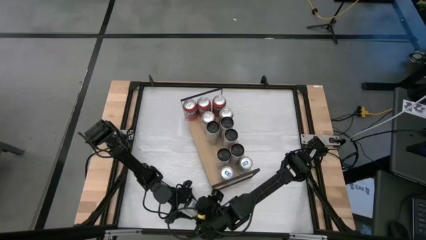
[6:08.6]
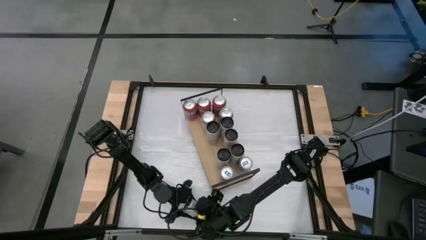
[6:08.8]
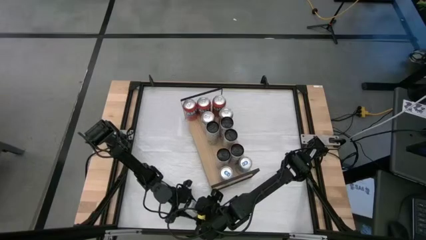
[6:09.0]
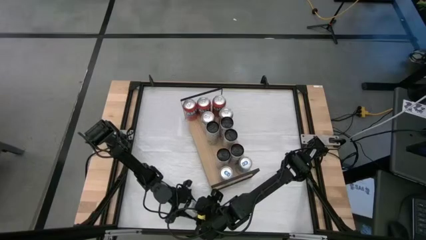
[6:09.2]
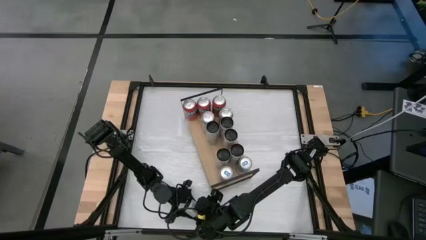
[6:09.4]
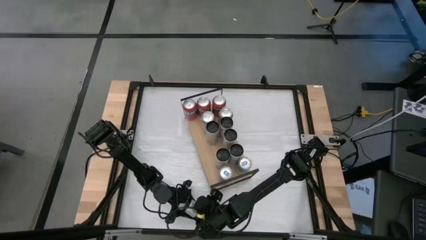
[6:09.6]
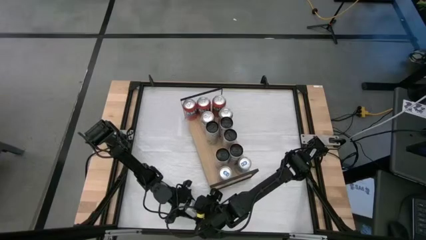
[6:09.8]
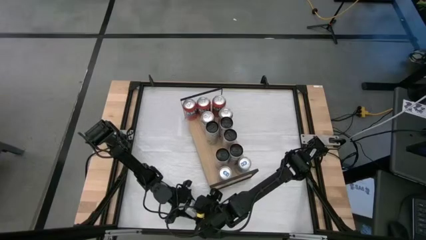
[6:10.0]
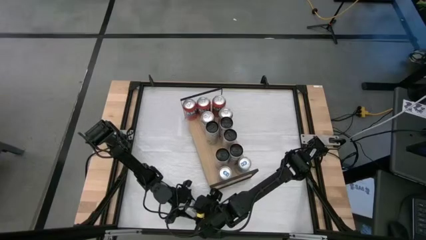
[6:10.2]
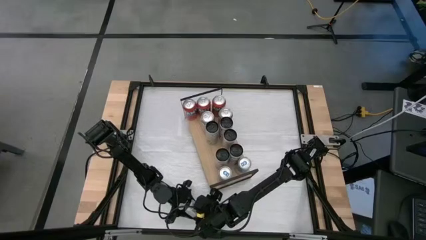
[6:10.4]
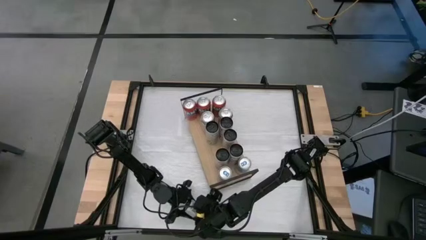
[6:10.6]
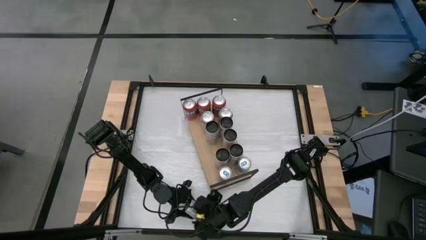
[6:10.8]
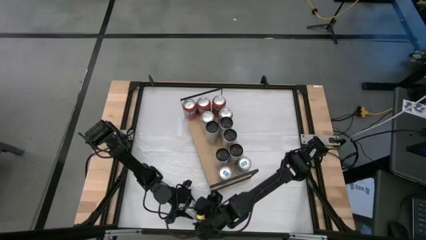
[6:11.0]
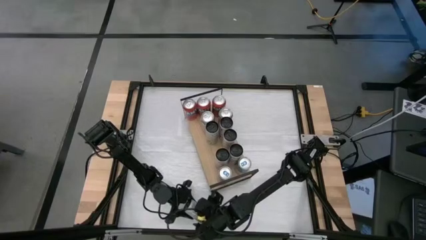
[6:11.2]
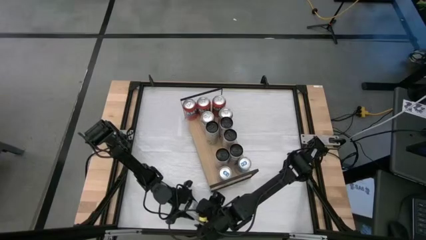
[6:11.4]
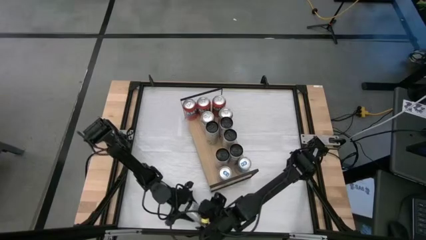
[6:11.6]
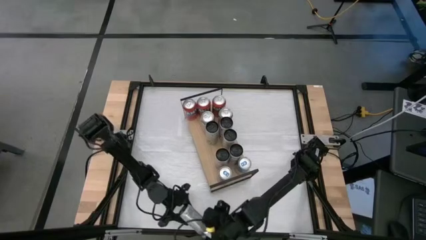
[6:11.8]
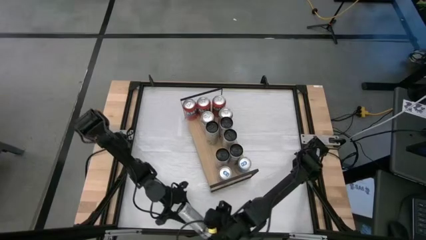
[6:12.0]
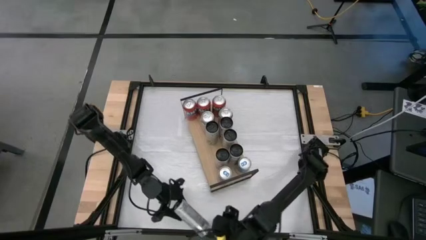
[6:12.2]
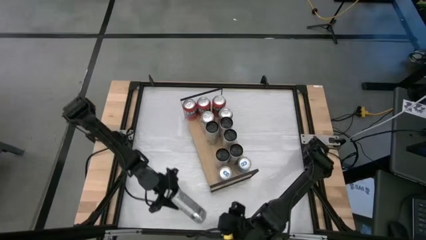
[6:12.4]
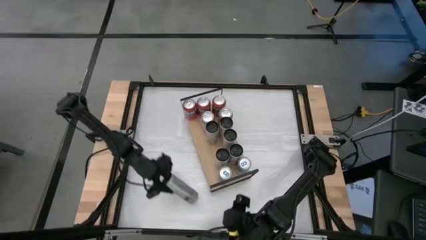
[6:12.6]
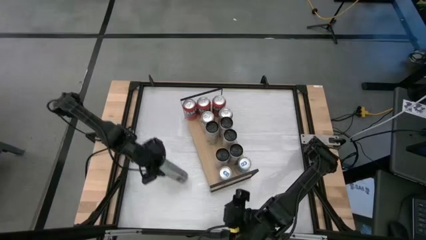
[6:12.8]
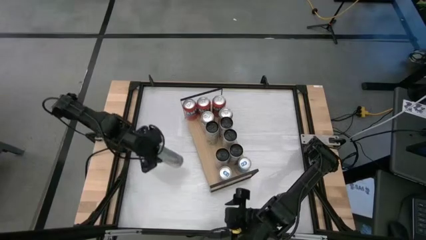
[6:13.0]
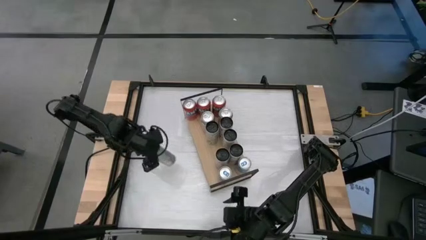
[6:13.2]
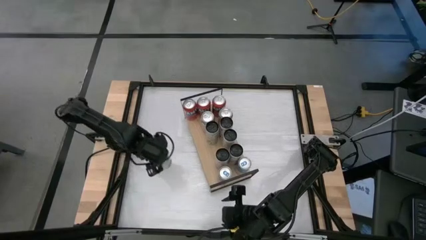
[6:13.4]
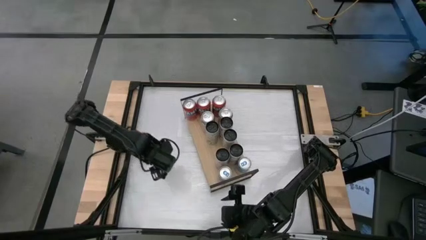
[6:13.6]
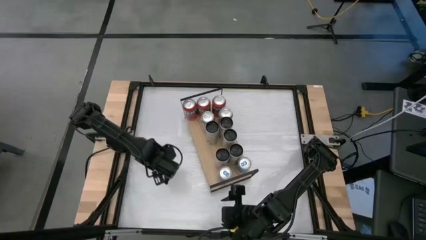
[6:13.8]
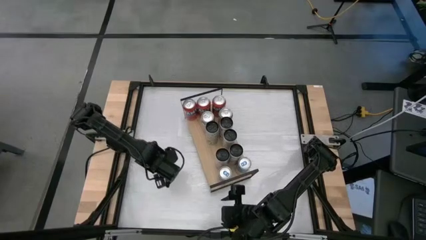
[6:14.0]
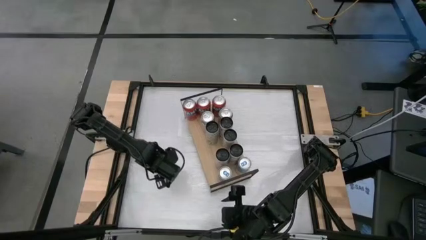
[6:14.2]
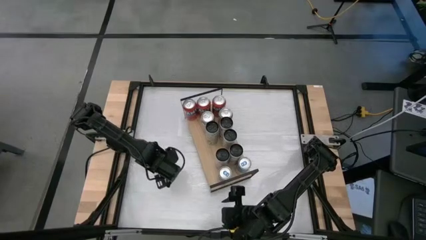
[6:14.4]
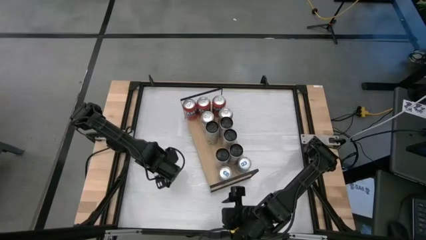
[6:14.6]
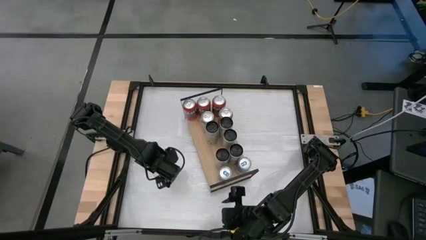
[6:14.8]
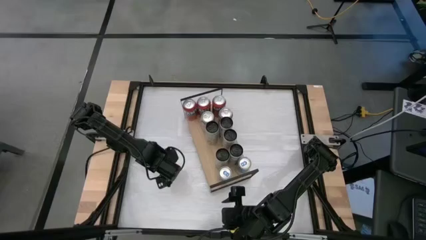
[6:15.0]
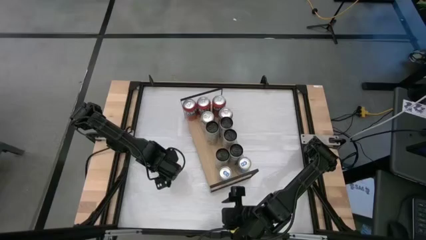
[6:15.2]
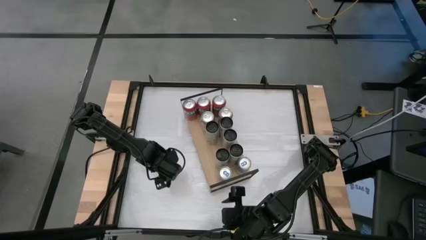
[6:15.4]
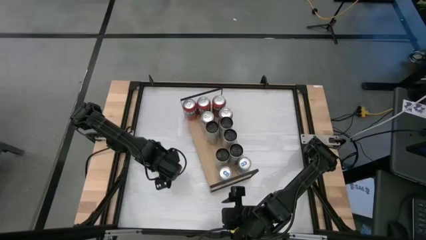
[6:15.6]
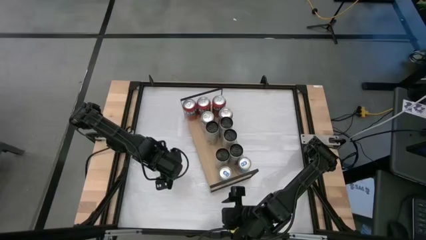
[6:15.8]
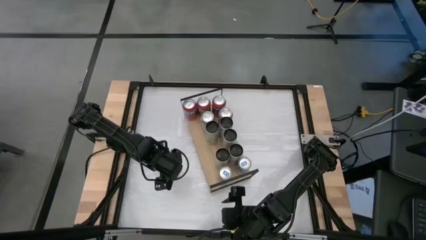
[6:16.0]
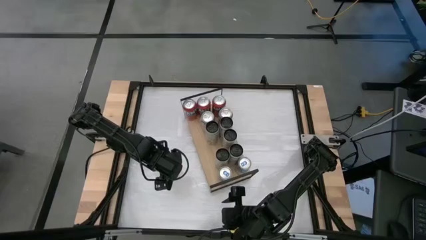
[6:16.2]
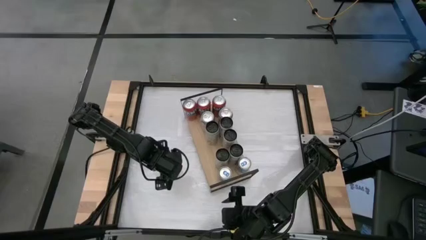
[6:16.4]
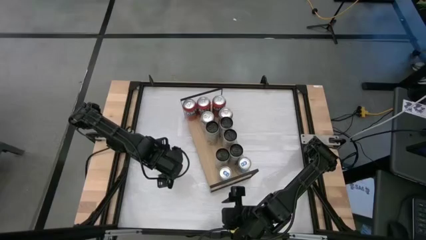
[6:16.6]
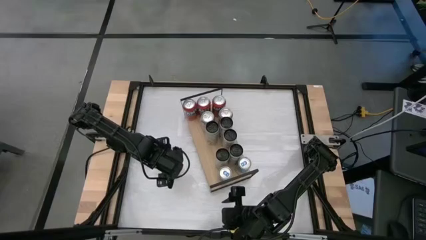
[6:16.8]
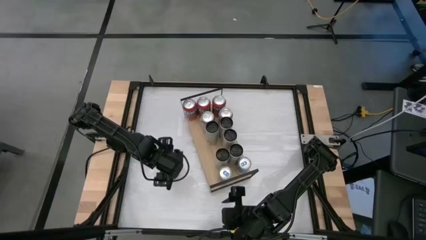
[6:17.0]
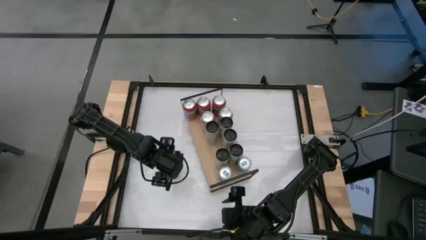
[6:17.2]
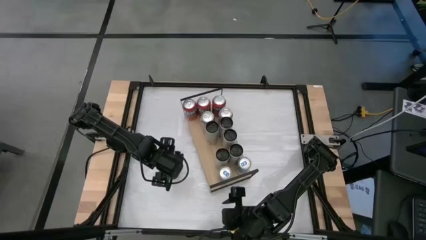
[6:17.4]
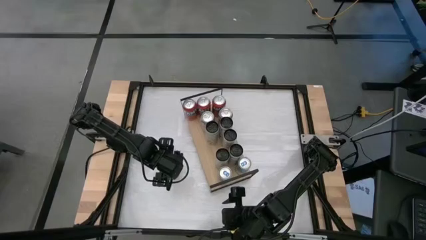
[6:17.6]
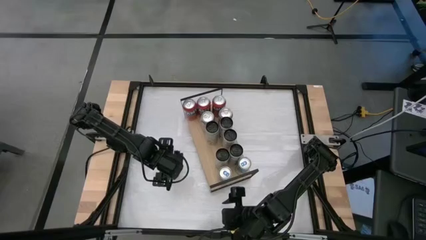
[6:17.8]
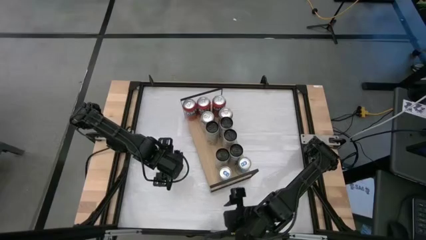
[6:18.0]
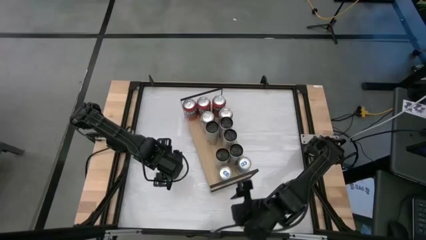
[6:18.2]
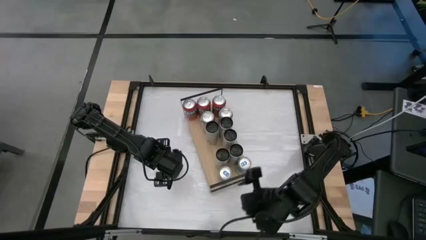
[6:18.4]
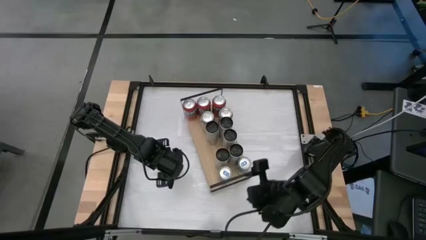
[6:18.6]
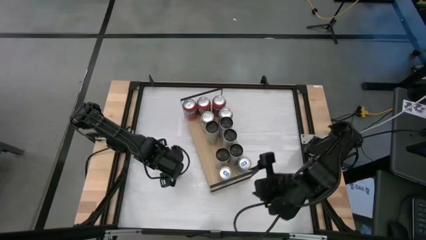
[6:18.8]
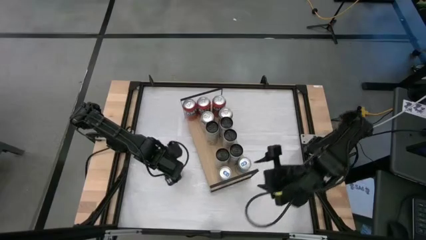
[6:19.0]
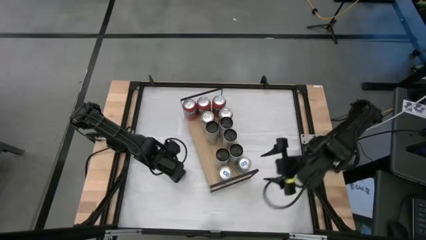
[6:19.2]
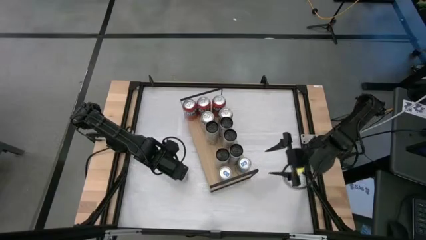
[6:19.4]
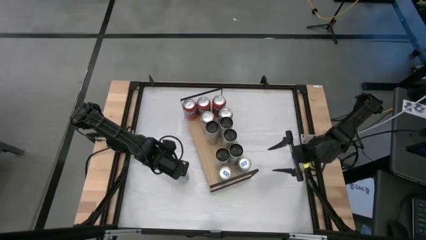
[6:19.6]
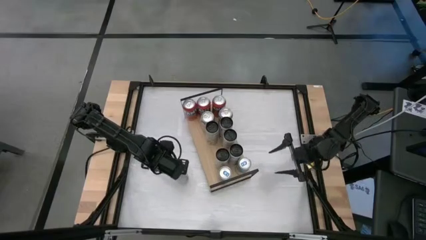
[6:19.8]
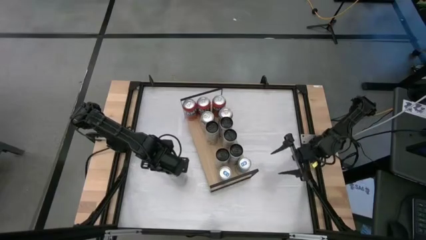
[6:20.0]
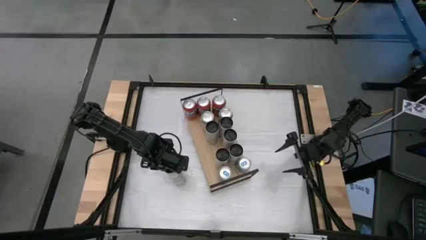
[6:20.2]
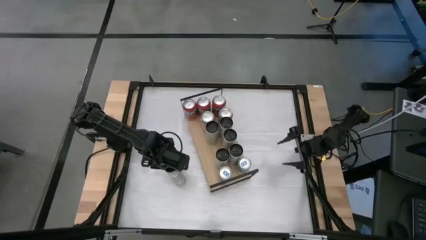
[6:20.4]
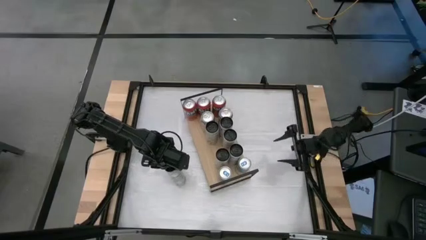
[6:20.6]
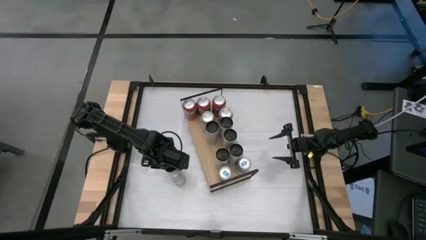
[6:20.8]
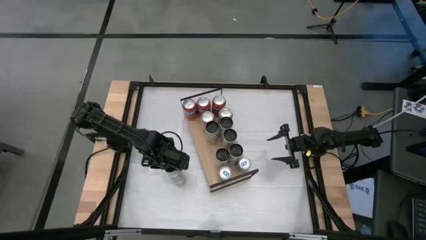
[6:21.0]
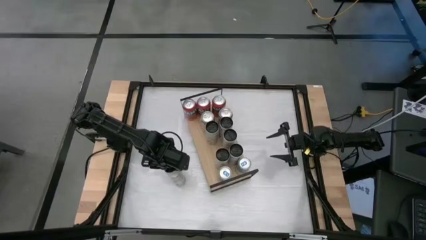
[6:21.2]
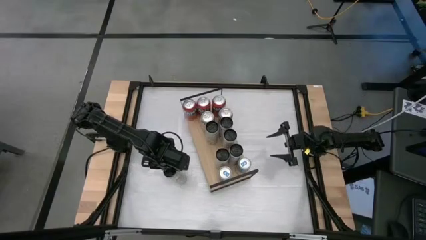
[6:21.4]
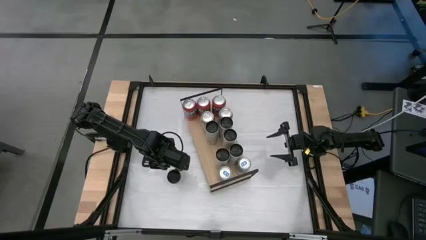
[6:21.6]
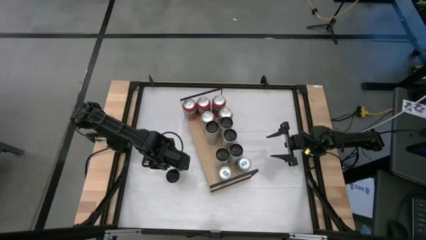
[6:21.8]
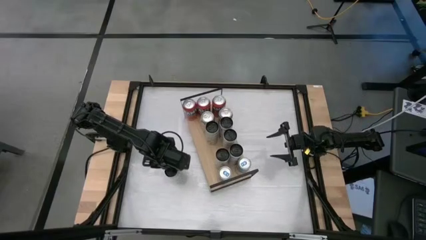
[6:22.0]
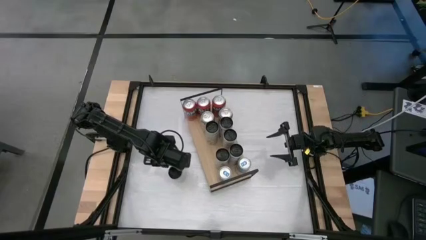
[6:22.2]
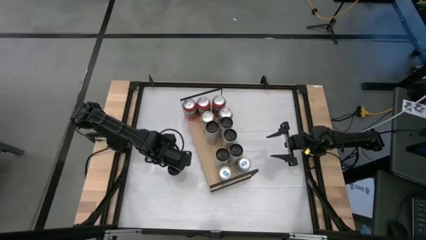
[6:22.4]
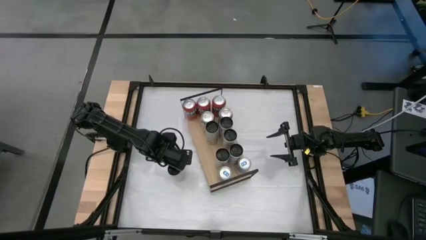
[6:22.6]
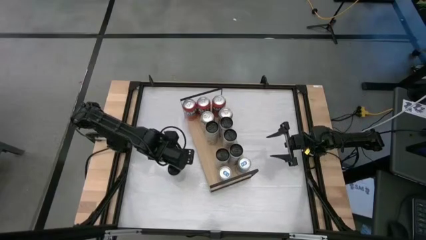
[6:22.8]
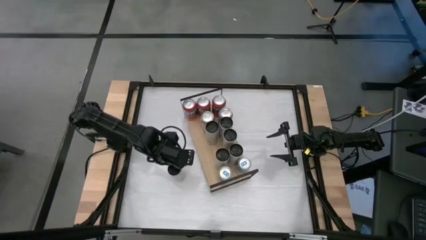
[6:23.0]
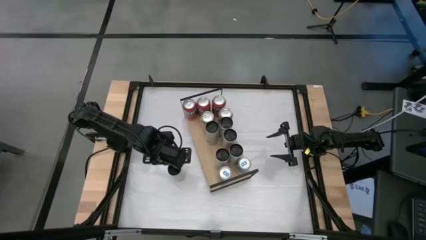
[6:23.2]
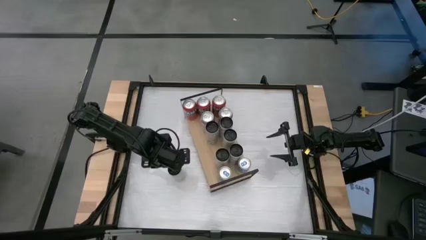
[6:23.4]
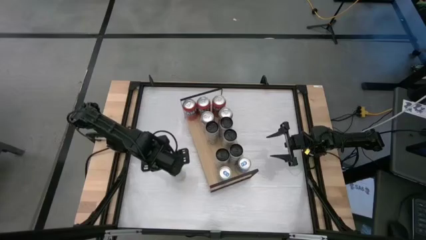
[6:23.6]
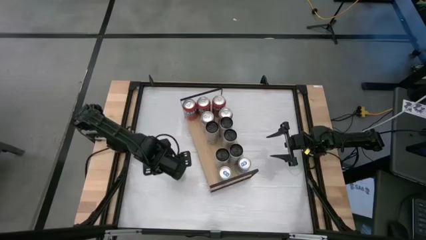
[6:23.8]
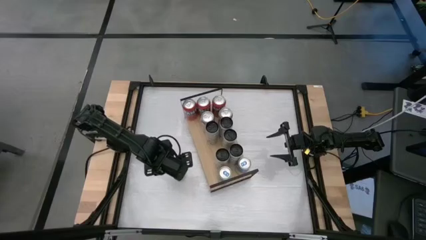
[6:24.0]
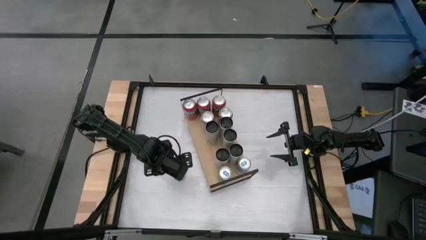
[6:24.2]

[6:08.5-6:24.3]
Task: Place canned beverage on shelf
Align the yellow soda can with the other yellow soda can
